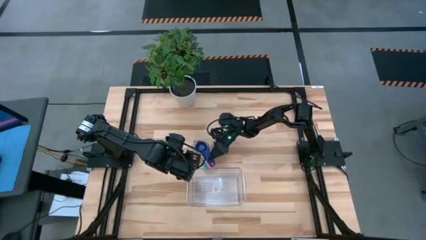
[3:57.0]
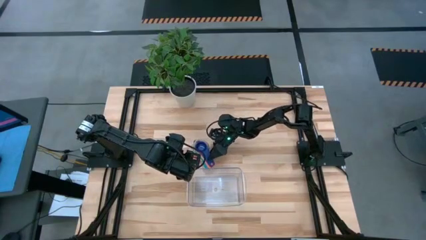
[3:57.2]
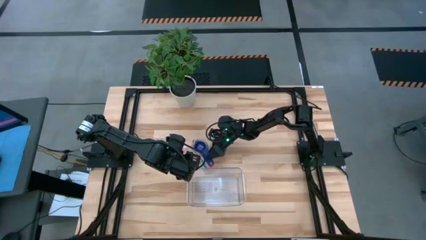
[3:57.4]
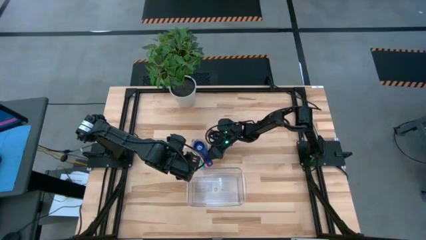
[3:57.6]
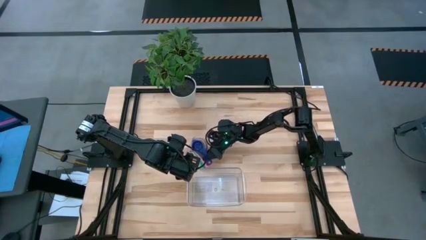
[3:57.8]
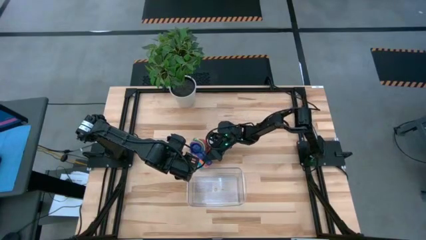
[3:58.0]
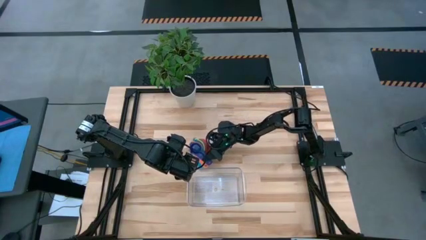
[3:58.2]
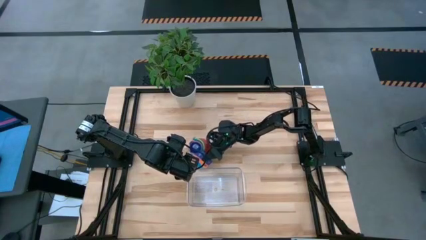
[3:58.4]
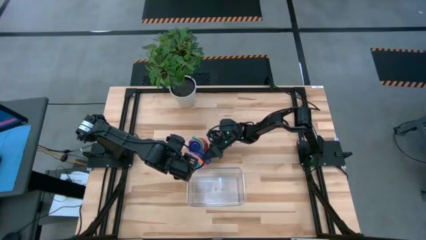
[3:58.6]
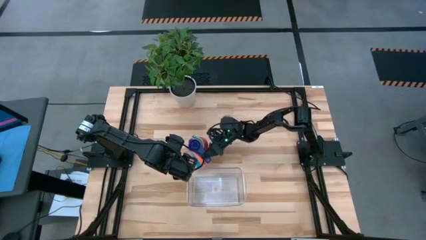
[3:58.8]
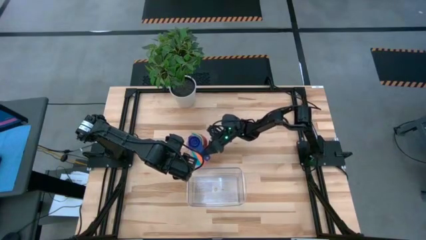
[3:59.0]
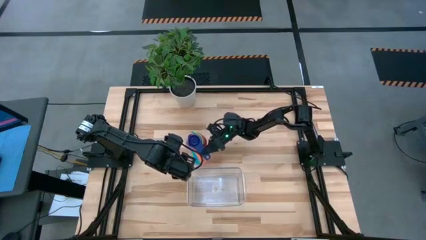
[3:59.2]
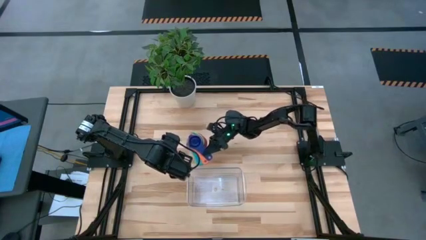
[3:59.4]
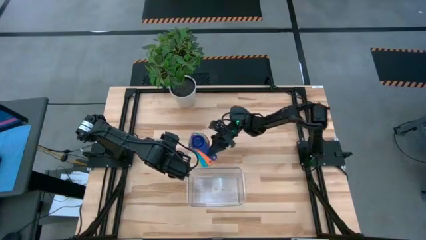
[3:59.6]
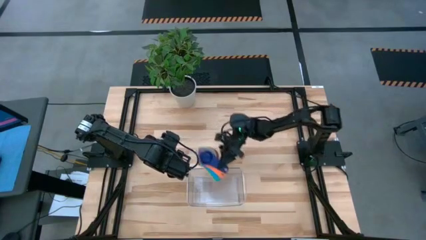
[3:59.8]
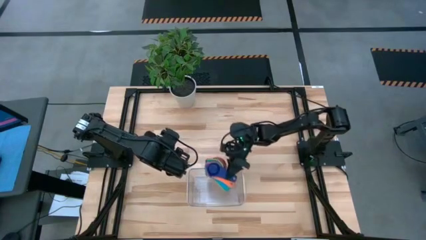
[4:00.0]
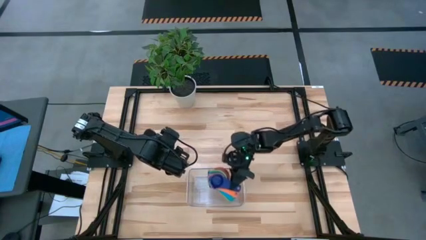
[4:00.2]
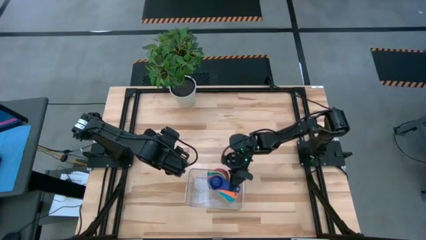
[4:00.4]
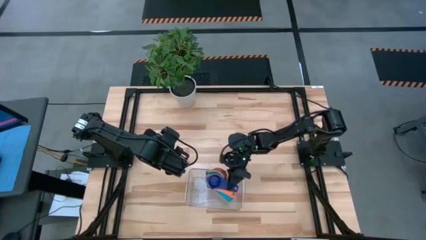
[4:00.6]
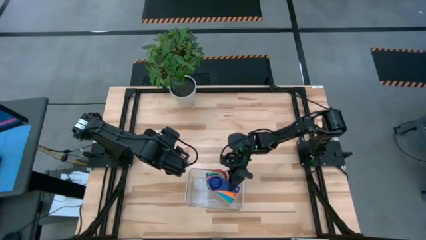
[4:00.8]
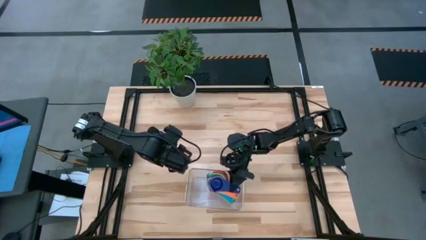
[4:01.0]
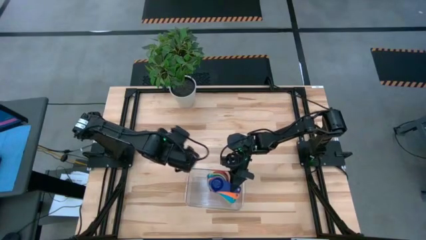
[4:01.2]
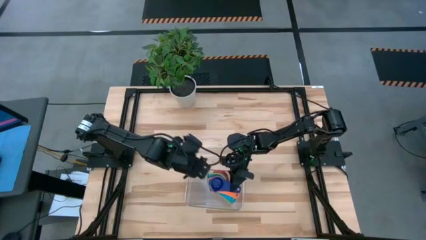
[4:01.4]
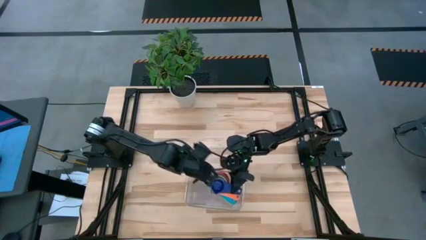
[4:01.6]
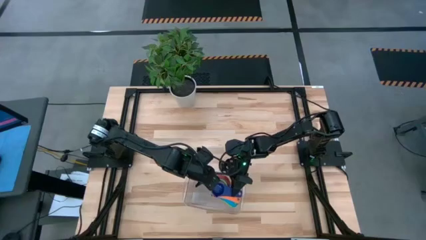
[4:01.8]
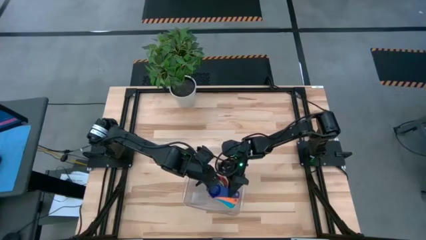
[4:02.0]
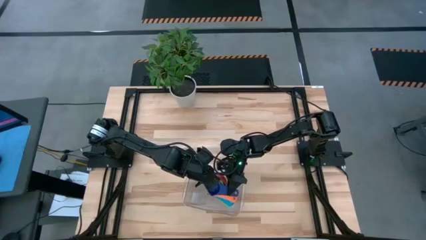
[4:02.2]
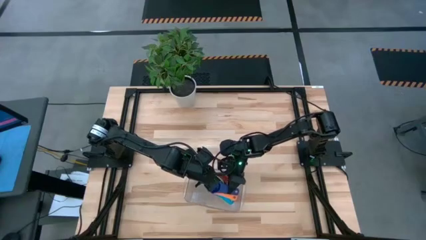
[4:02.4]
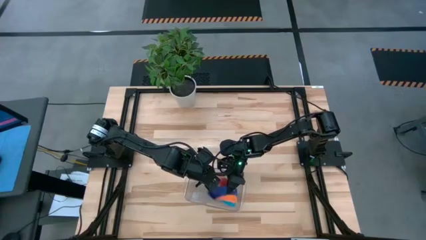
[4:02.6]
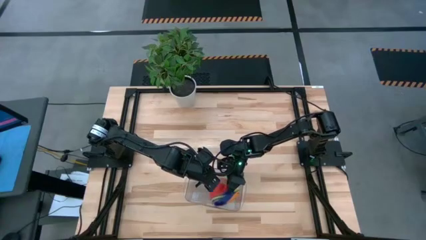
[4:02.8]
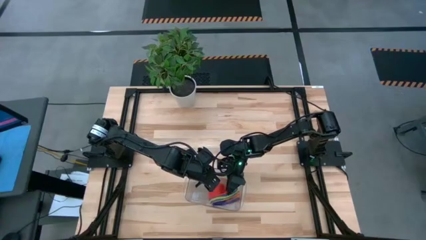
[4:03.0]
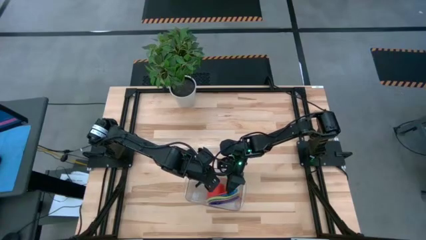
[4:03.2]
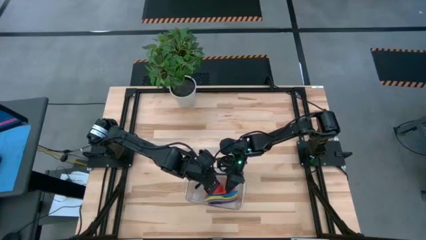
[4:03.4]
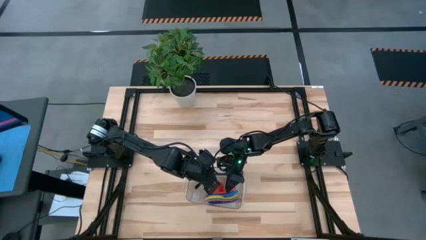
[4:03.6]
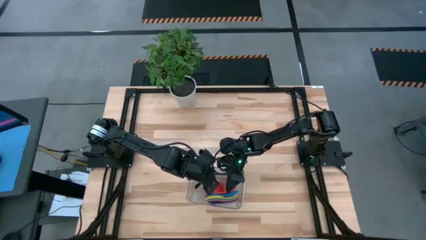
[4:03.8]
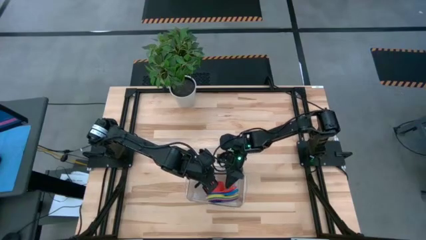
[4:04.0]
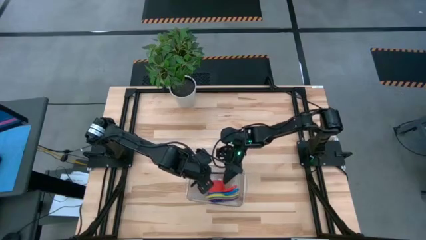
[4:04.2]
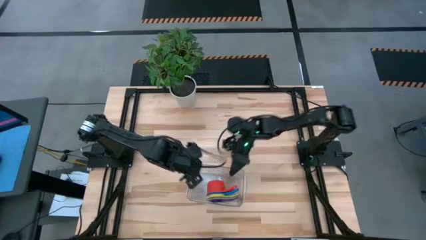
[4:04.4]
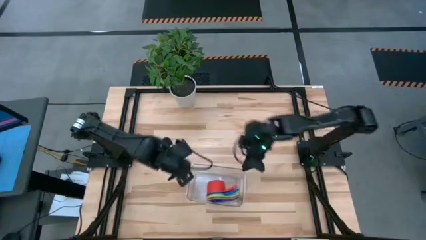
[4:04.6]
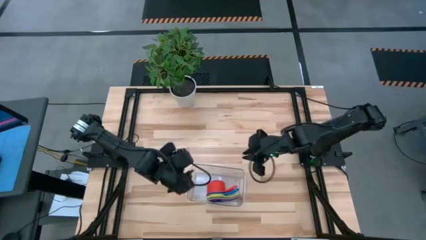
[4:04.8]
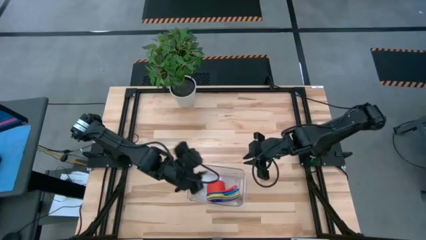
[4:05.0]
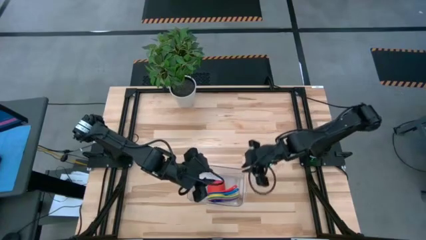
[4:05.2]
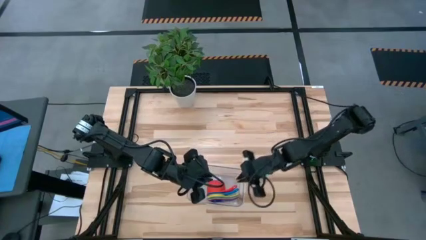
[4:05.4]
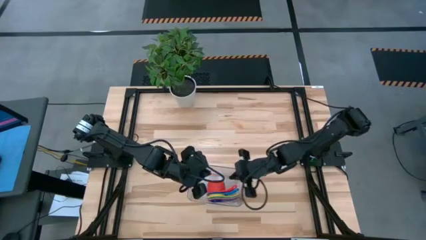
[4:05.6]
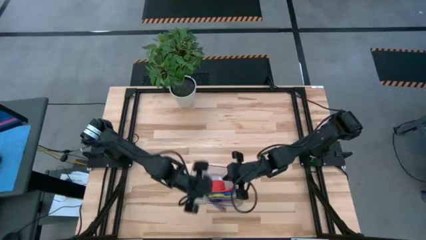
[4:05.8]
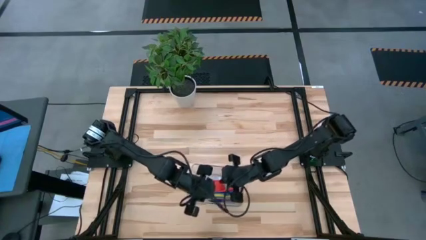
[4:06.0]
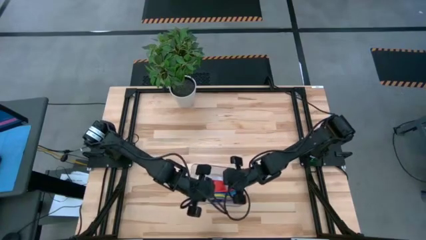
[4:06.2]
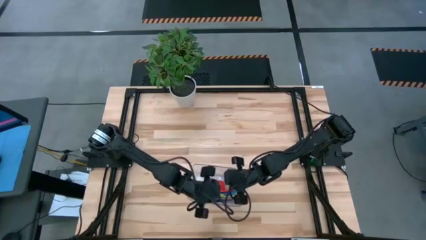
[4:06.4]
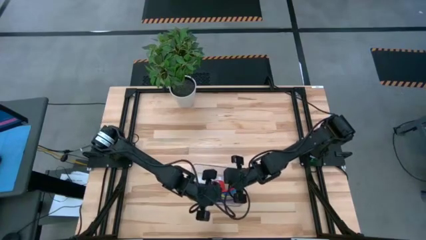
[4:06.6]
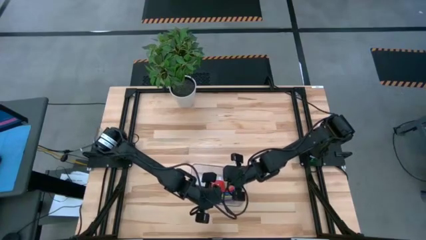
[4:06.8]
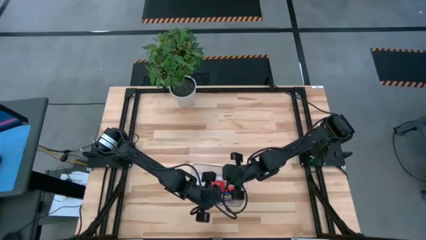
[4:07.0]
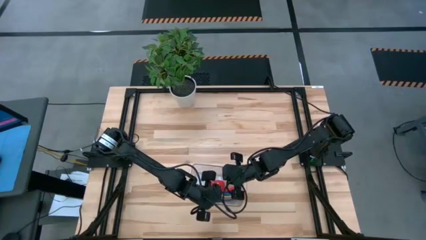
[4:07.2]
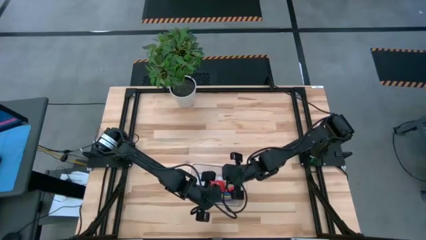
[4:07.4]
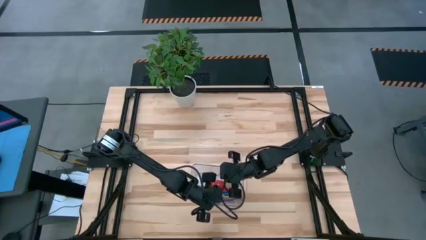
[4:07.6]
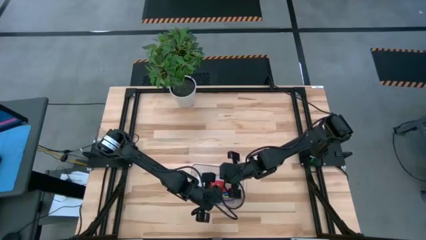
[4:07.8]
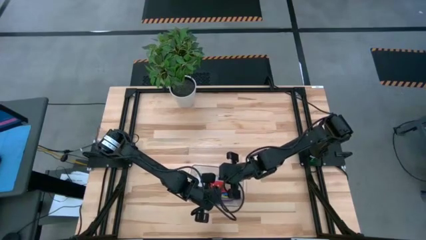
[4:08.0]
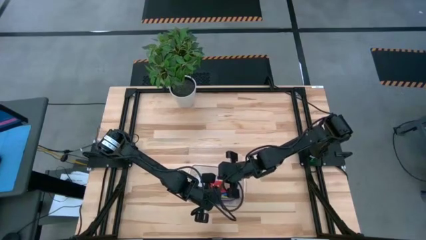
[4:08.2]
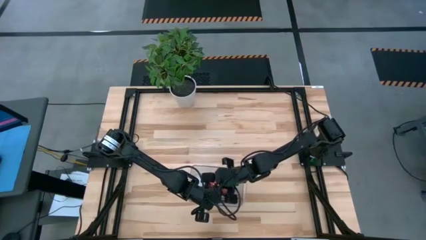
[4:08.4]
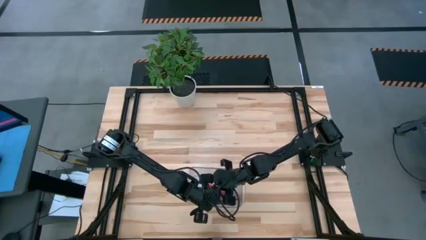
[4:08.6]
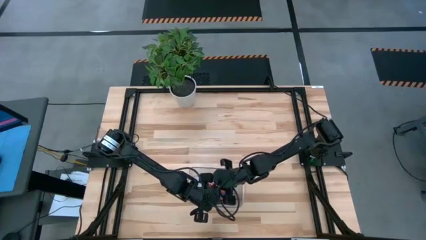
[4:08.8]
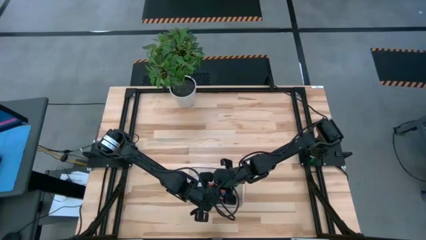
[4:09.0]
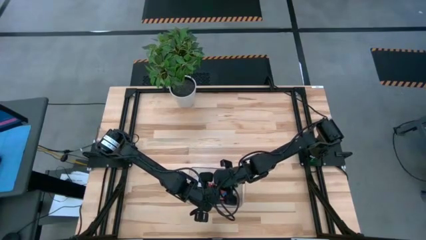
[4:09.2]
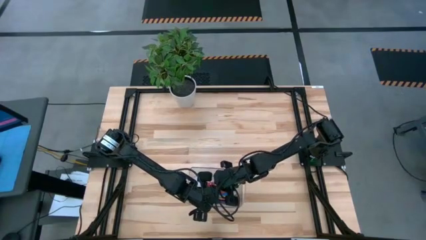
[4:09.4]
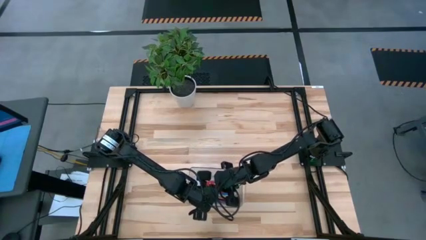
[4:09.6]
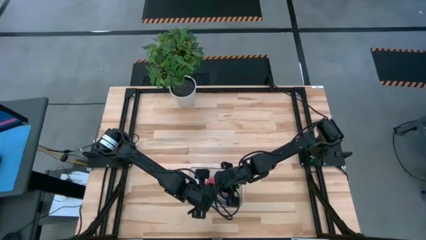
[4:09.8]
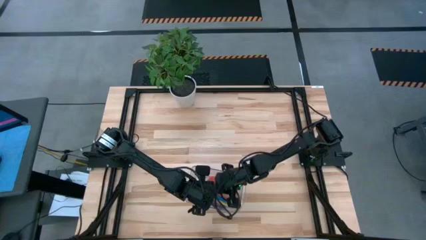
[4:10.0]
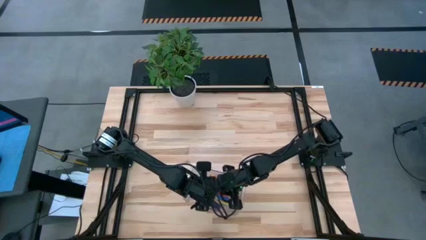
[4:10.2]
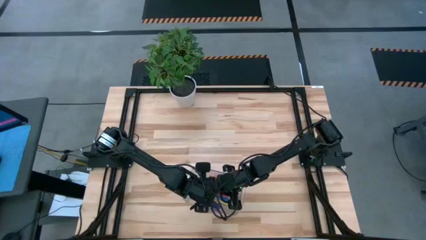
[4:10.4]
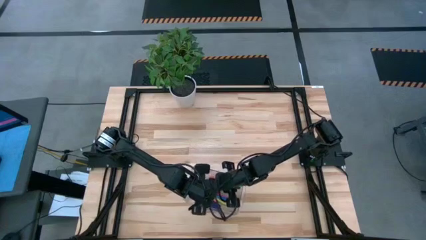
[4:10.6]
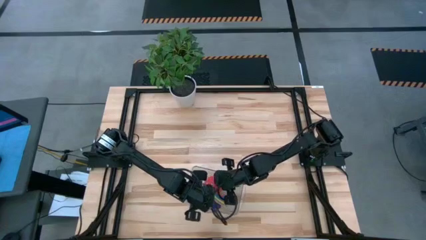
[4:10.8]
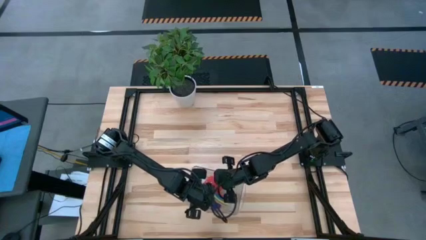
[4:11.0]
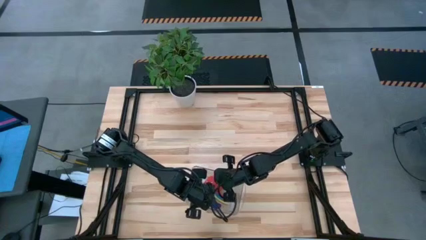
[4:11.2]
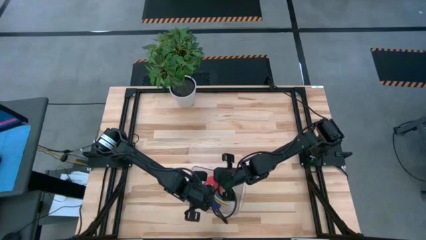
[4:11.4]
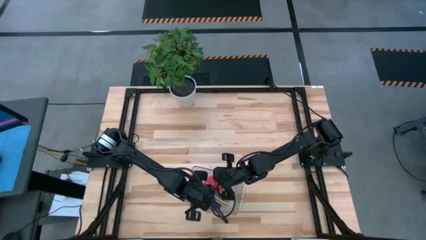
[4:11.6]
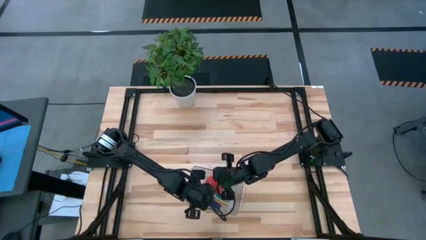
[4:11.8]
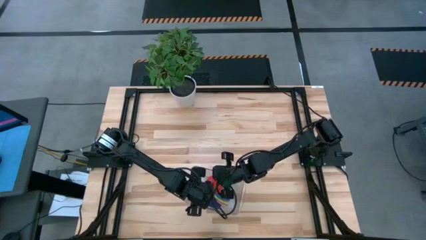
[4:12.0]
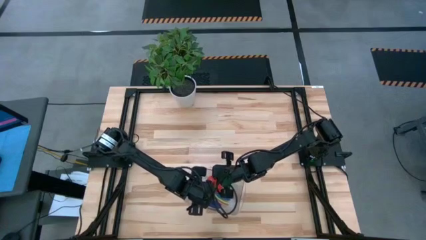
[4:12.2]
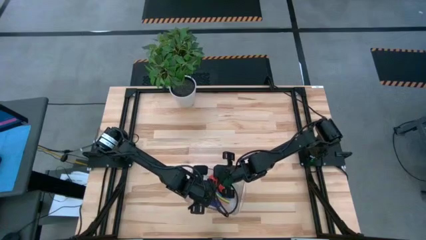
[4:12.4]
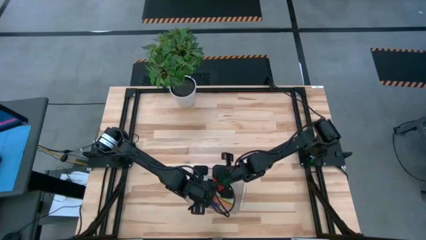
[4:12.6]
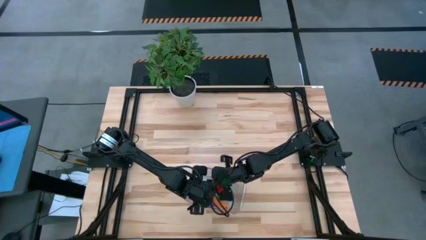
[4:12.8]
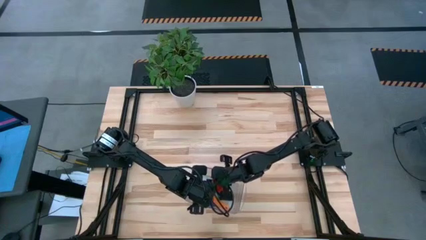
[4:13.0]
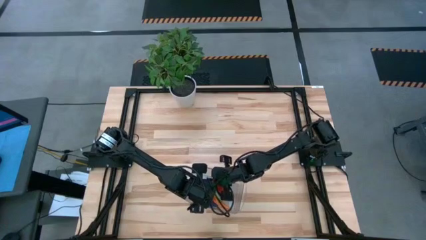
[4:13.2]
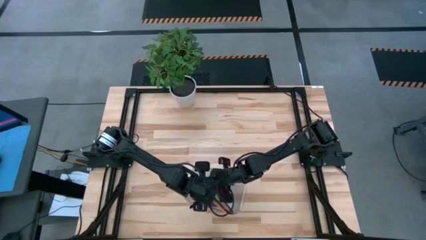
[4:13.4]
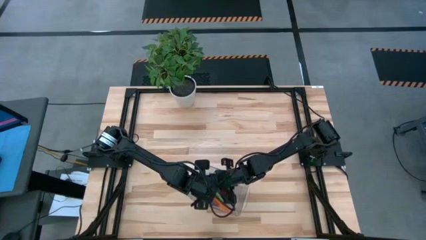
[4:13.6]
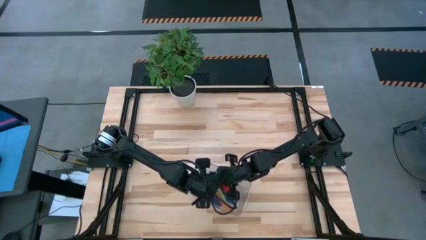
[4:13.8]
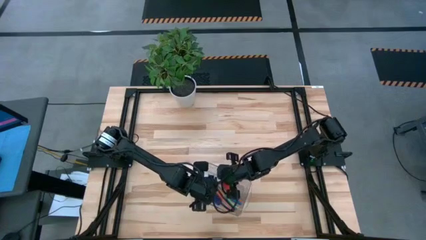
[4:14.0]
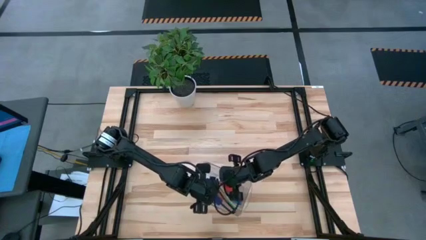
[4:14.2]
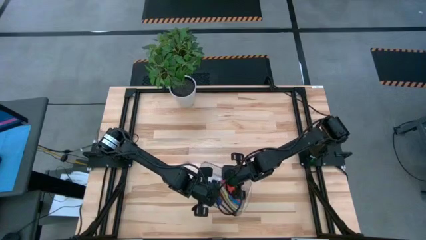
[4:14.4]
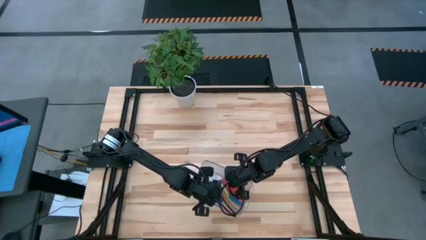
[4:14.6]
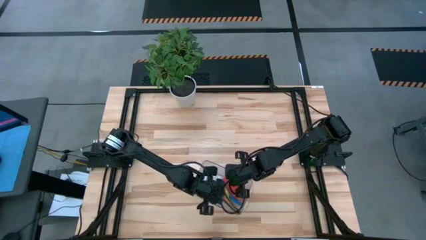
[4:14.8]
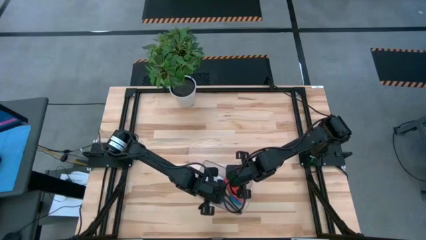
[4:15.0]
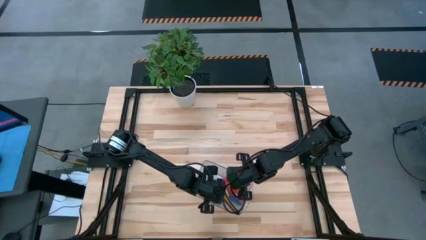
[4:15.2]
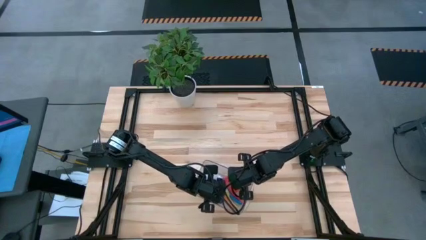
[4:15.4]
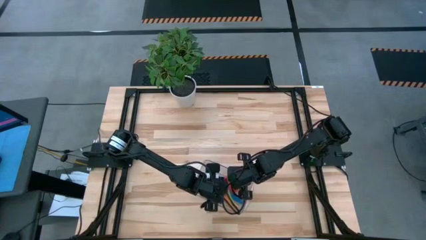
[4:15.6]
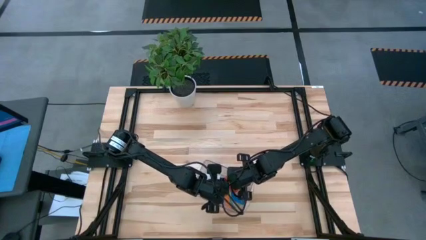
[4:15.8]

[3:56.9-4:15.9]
Task: Nest measuring cups in basket
Put the colored stacked measuring cups into the transparent bin
